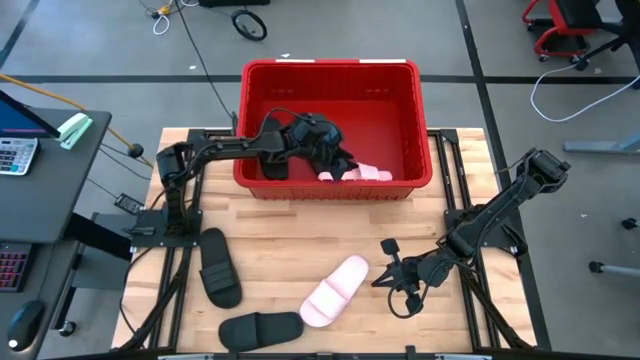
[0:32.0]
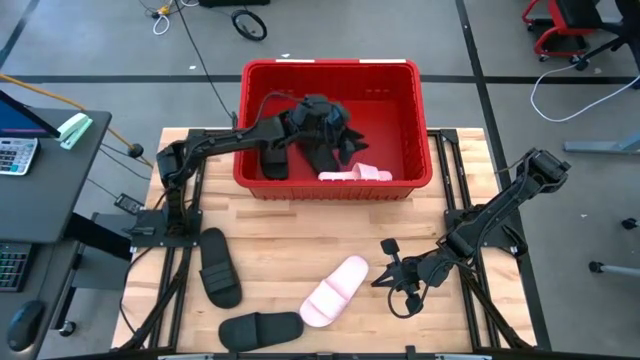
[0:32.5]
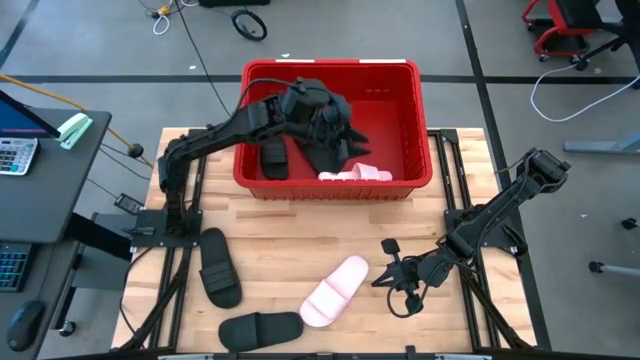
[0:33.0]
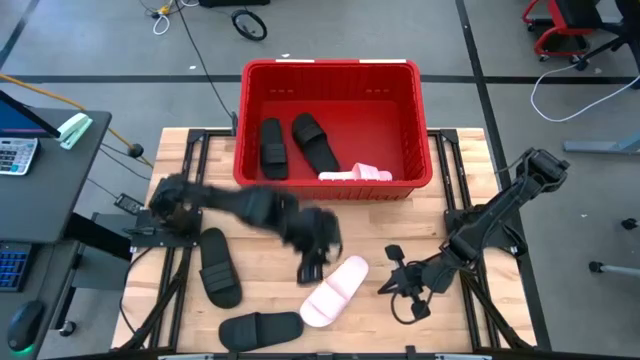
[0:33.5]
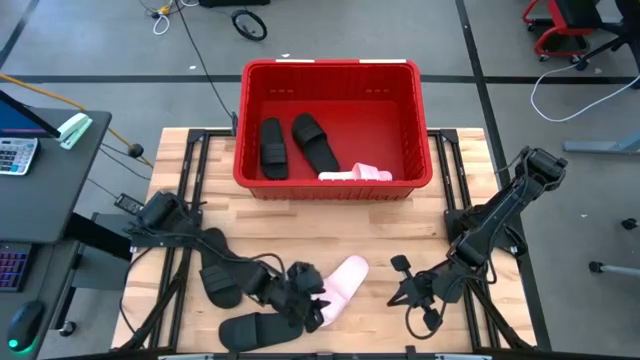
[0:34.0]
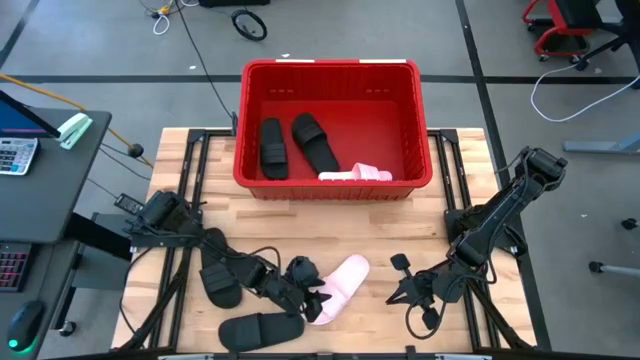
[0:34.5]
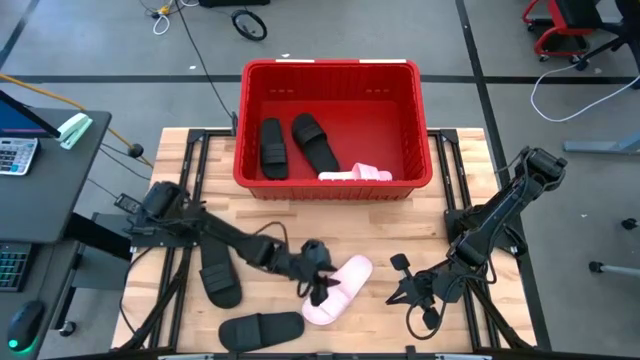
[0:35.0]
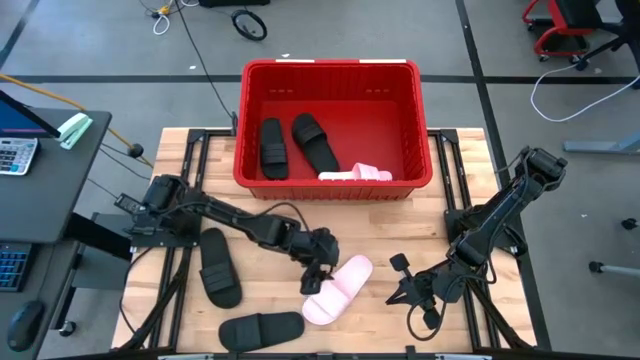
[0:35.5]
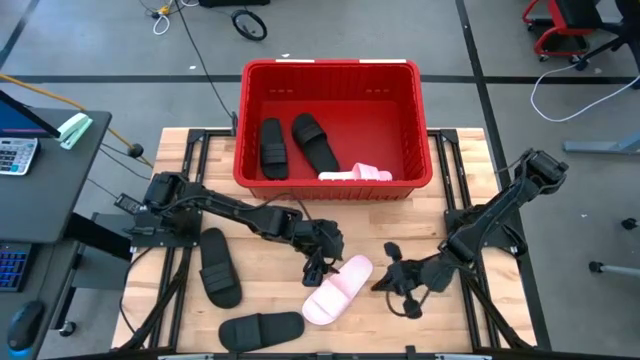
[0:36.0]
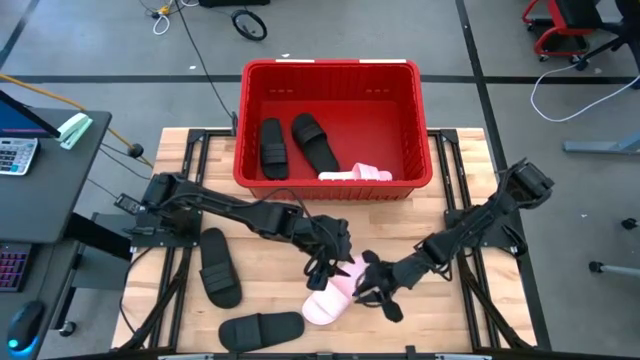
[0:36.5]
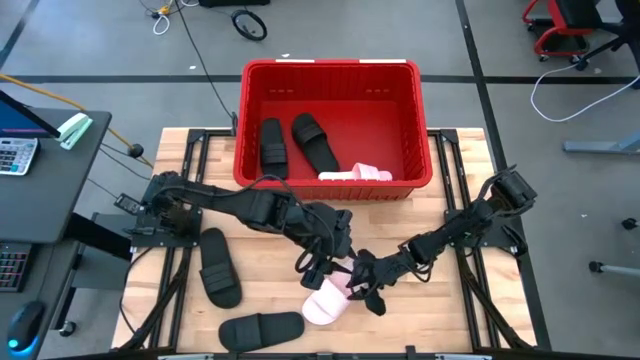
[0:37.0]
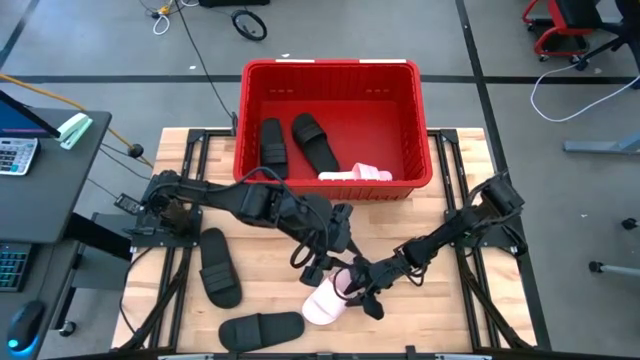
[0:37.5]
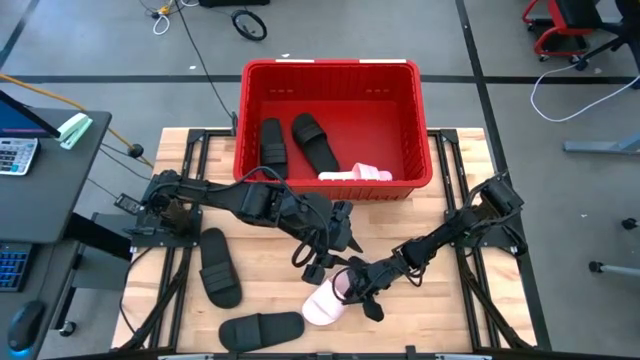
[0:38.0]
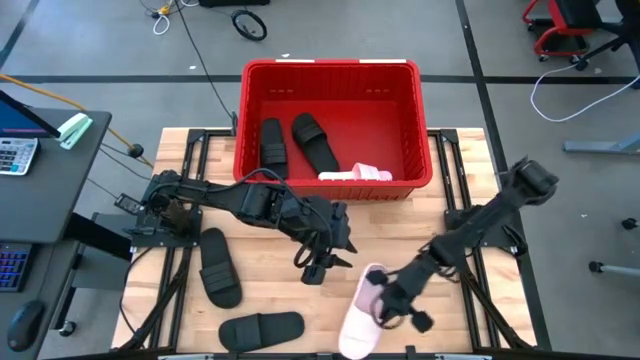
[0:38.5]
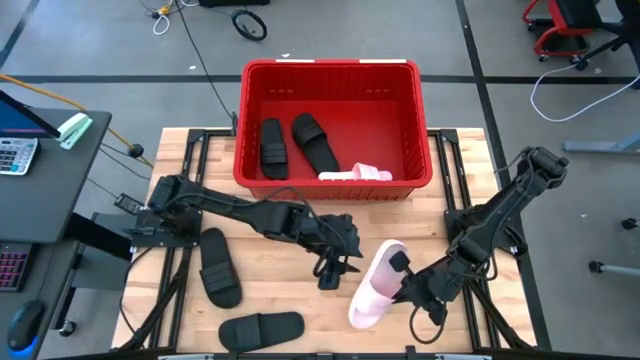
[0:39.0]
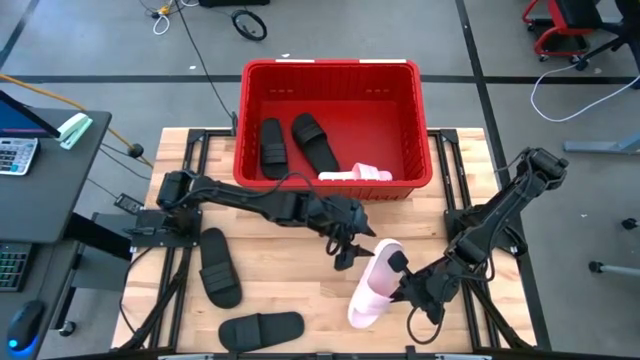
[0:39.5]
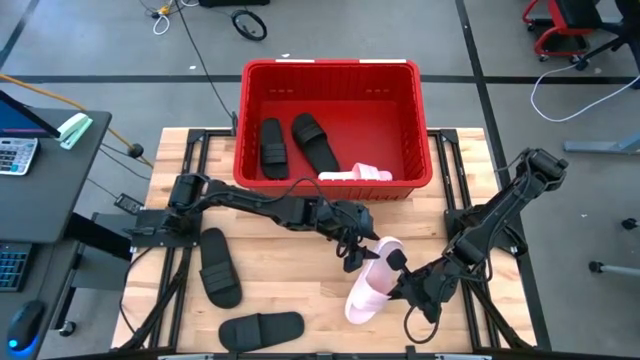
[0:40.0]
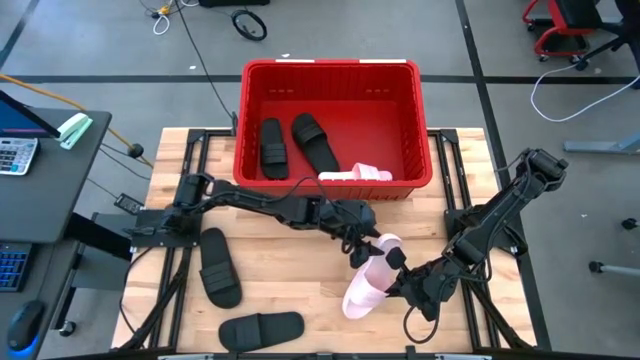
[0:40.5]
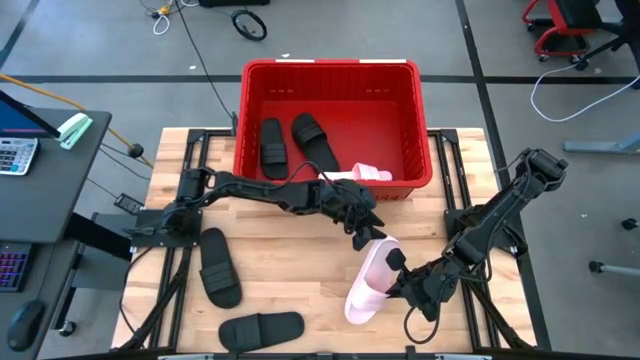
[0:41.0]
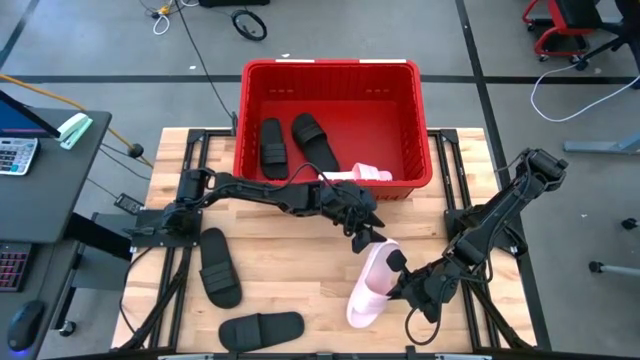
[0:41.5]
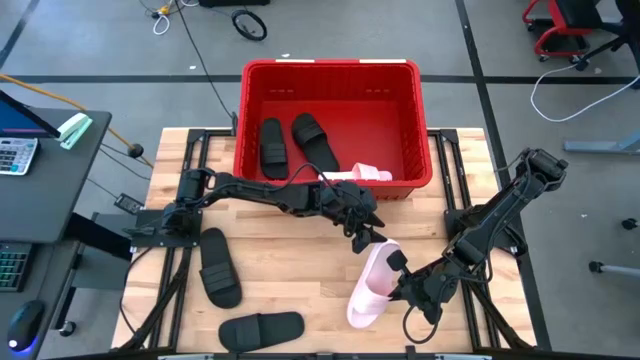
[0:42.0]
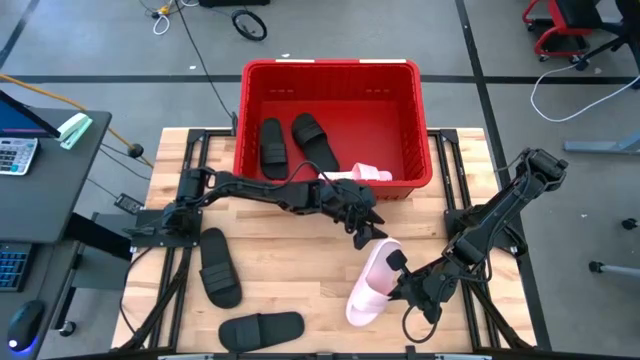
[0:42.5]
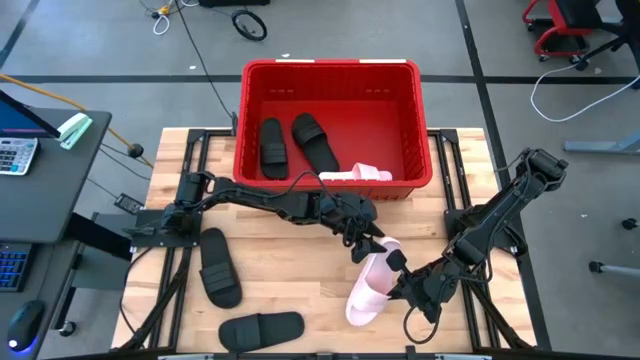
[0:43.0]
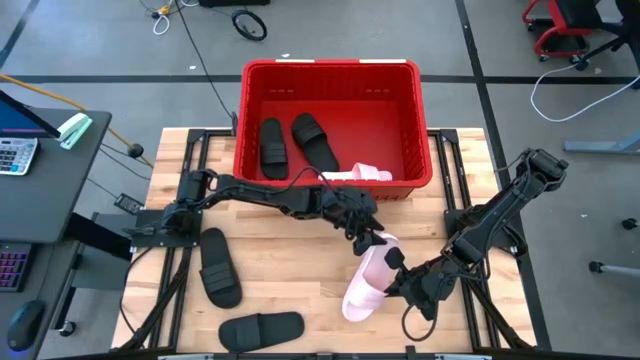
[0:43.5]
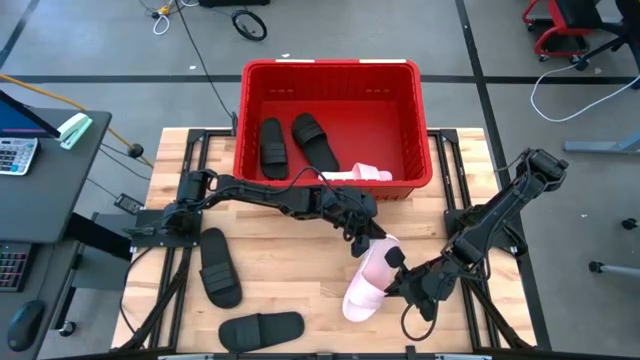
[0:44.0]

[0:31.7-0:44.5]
Task: Pick and place slides into bin
Put the pink slide into the red bin

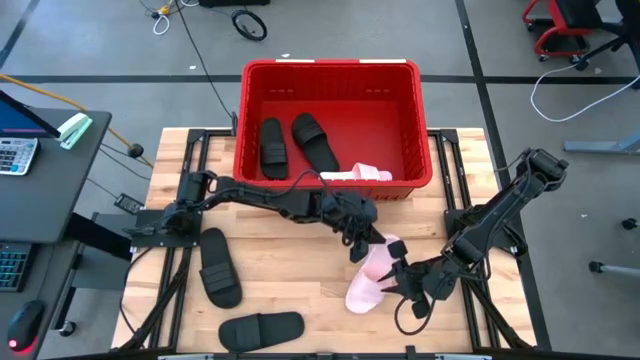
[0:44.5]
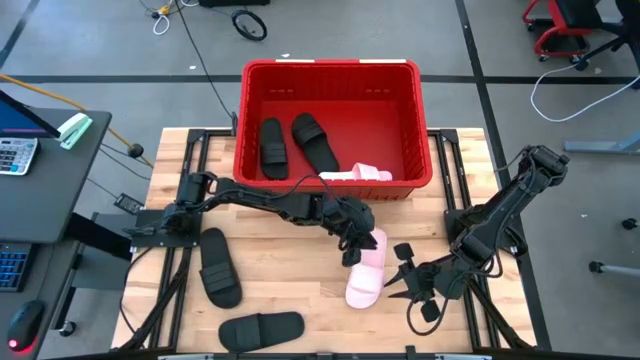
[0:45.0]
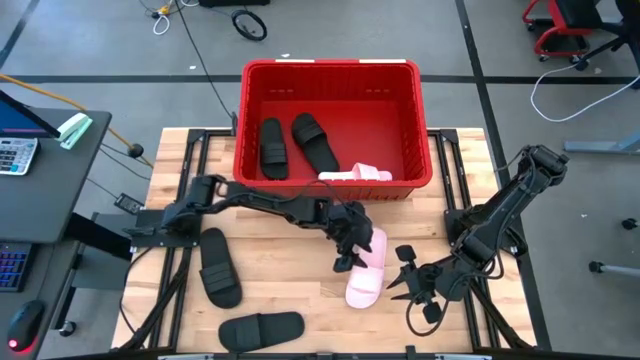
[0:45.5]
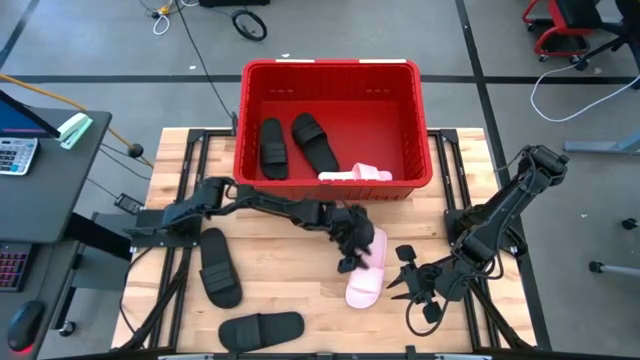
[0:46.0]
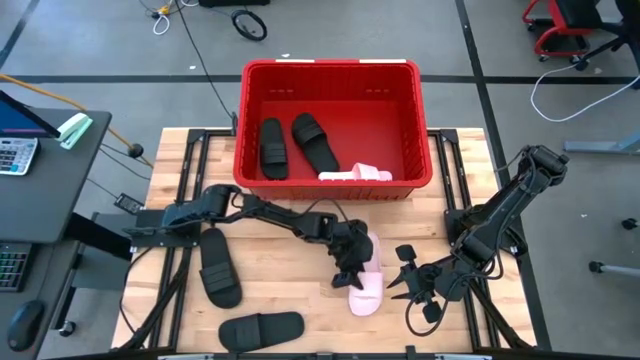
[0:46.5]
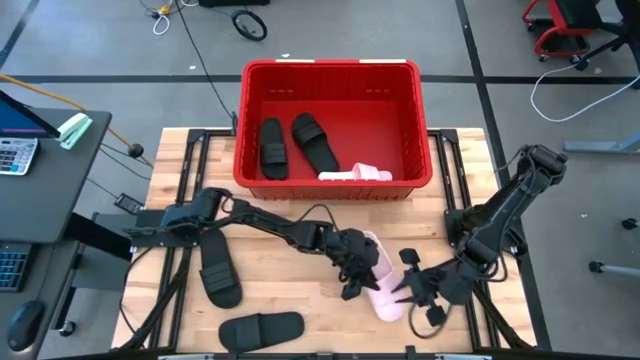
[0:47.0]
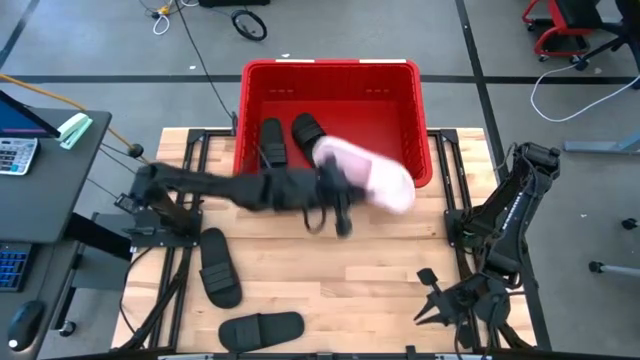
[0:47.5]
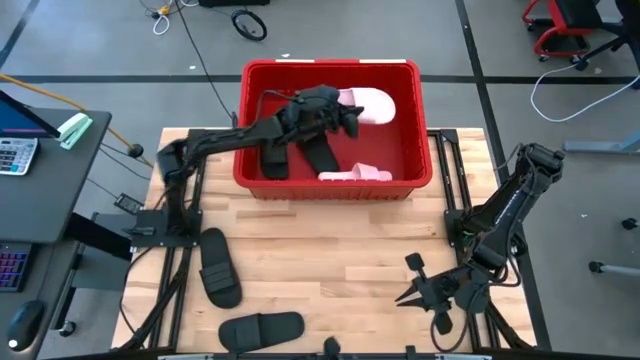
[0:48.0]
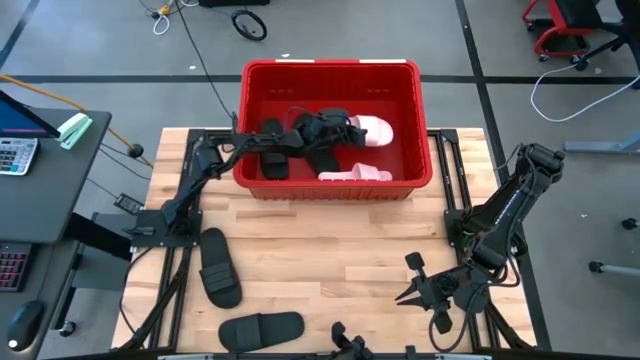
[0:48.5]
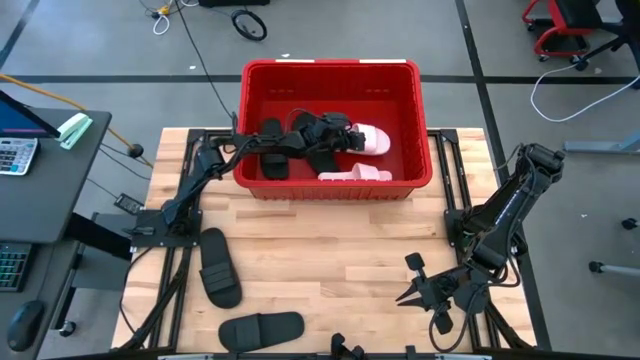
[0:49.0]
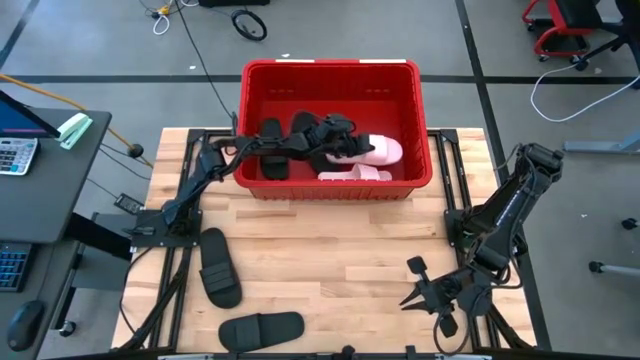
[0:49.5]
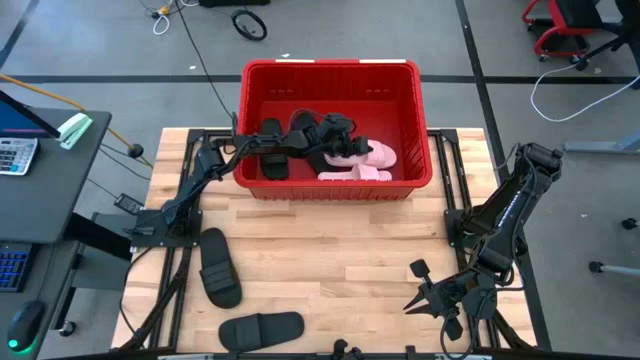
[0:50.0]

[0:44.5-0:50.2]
Put the pink slide into the red bin

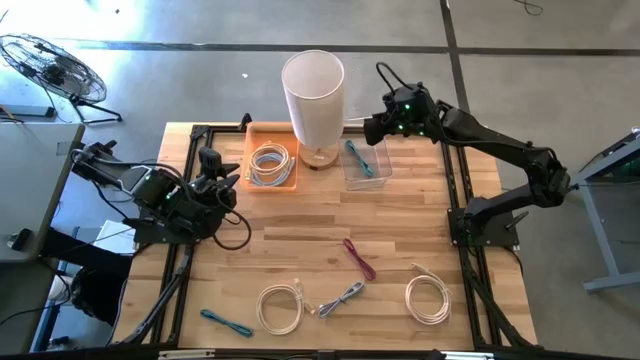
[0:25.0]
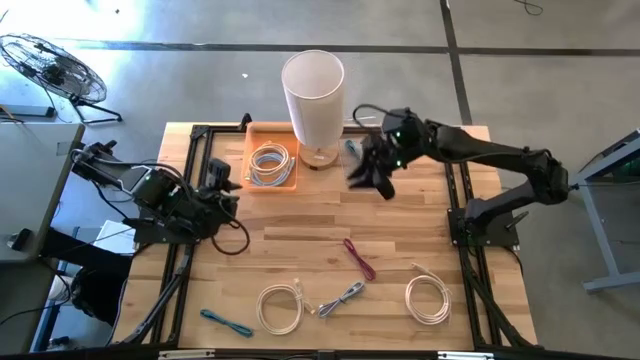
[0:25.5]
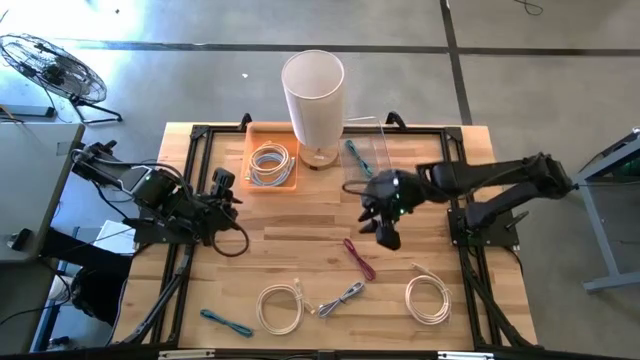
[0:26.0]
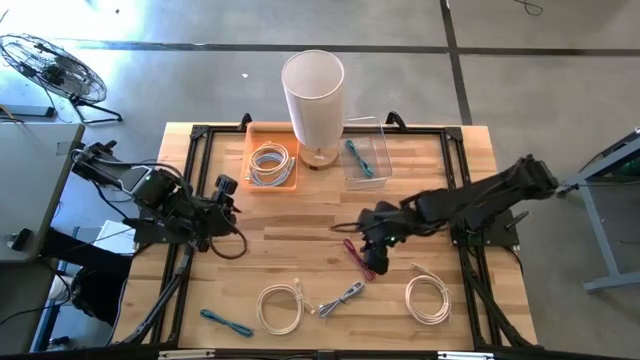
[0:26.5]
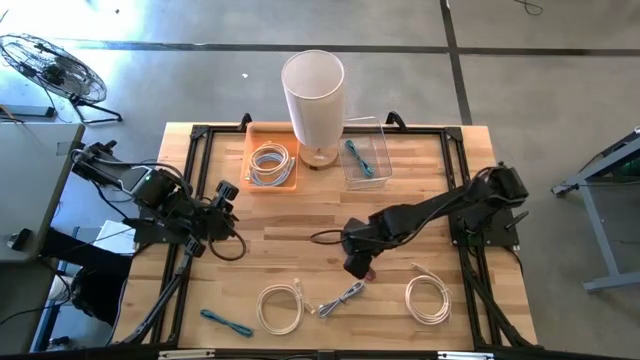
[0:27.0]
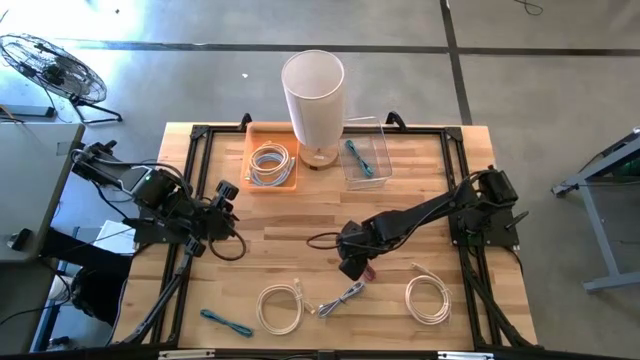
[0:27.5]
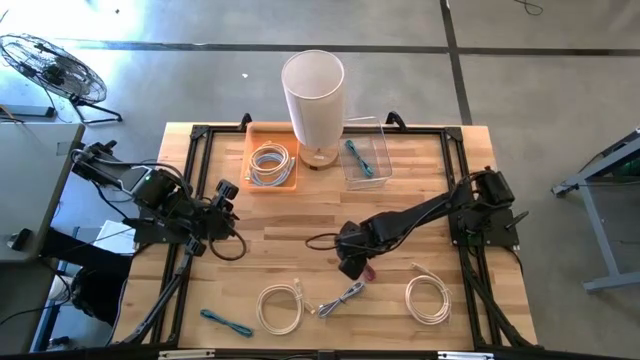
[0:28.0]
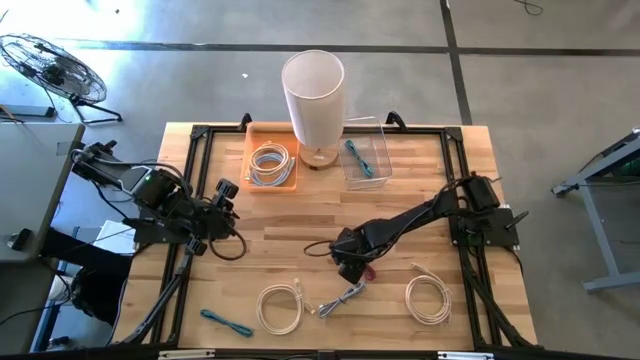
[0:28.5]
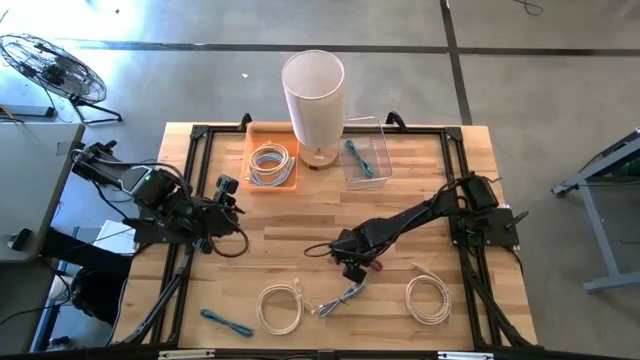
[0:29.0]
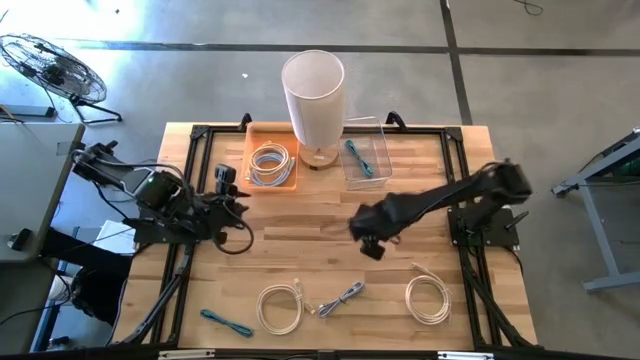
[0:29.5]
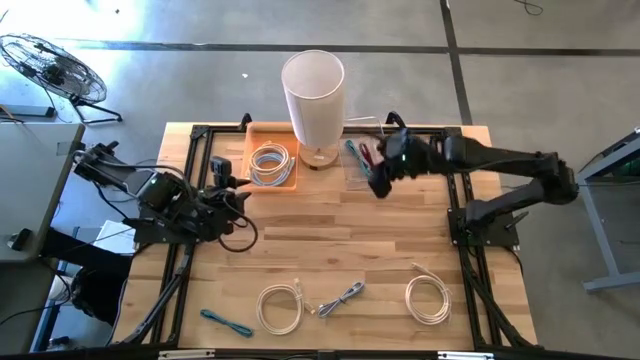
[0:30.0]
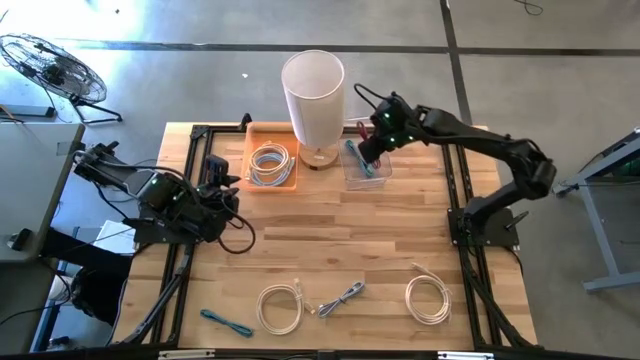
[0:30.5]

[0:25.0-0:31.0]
Task: Pick & Place USB Port
Put the pink USB cable into the transparent bin
